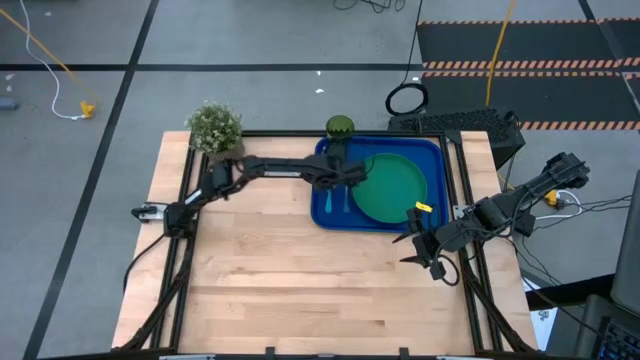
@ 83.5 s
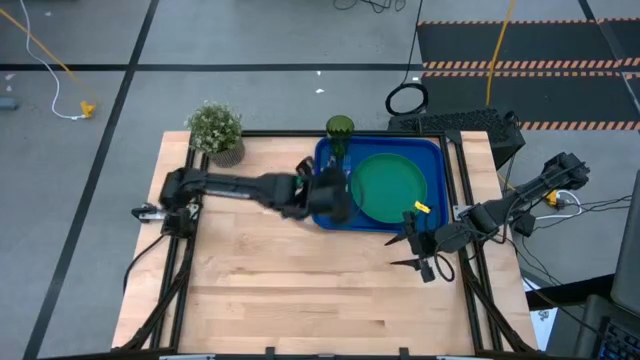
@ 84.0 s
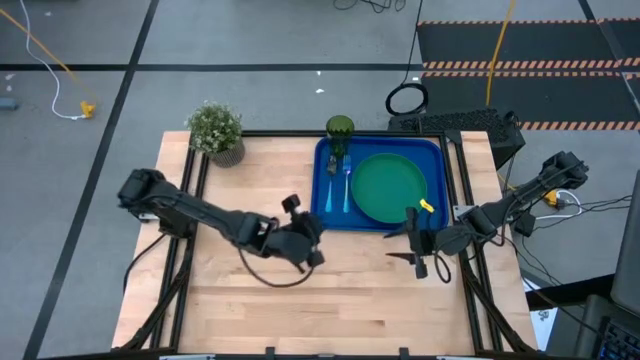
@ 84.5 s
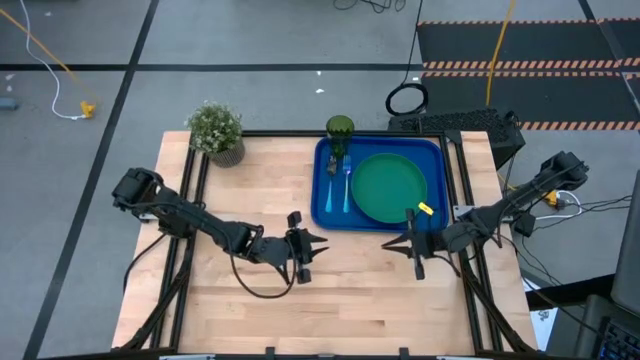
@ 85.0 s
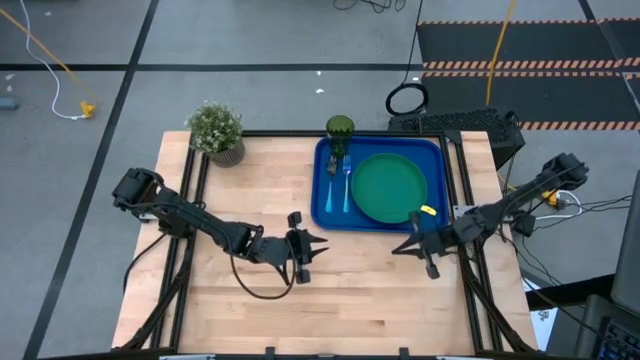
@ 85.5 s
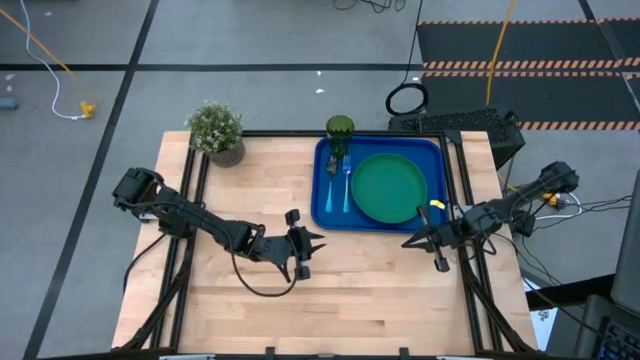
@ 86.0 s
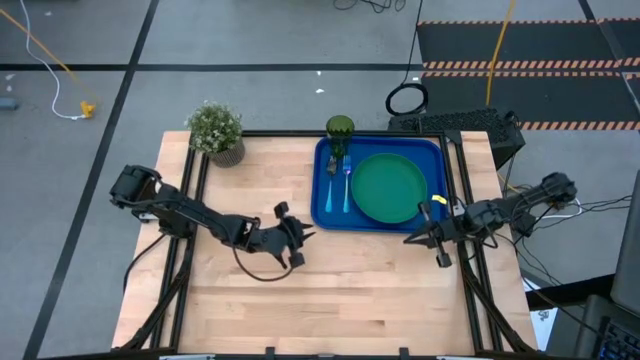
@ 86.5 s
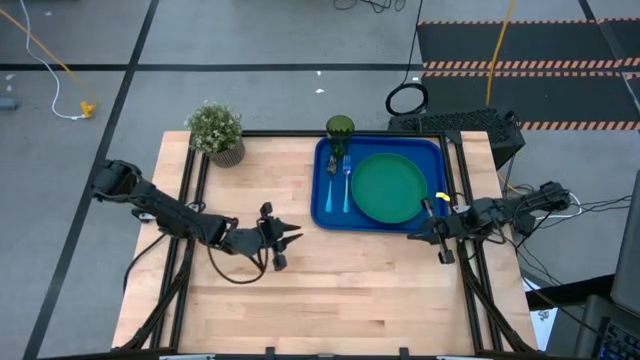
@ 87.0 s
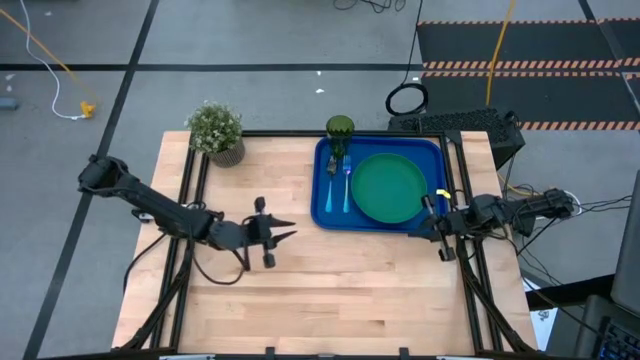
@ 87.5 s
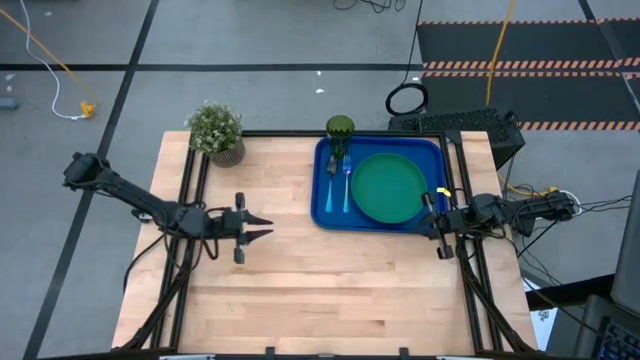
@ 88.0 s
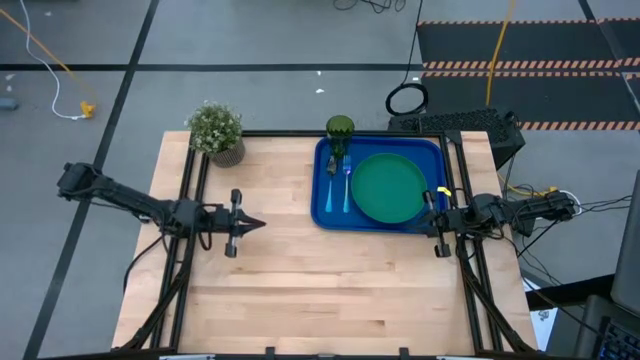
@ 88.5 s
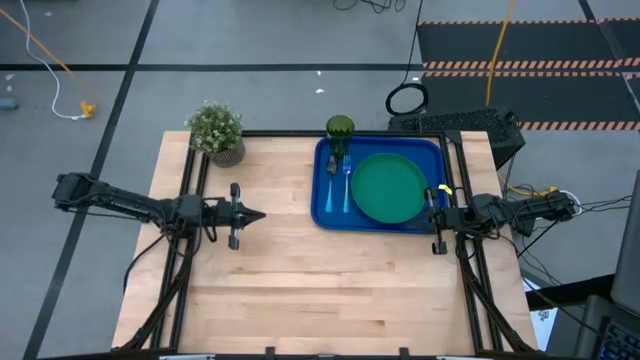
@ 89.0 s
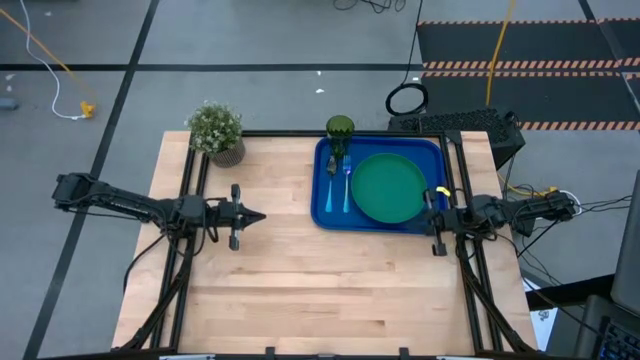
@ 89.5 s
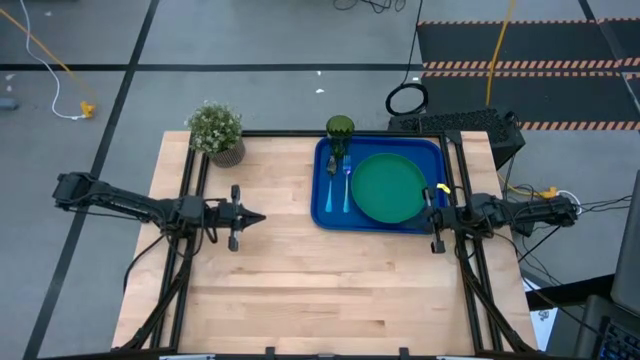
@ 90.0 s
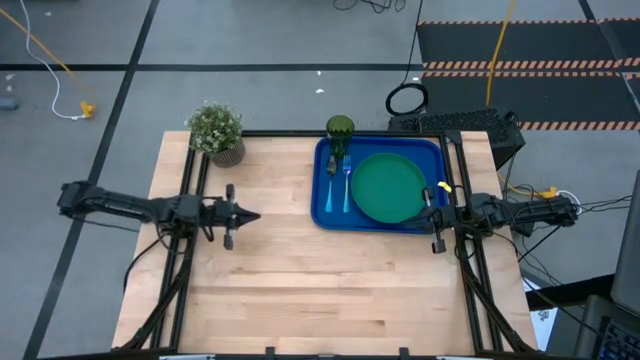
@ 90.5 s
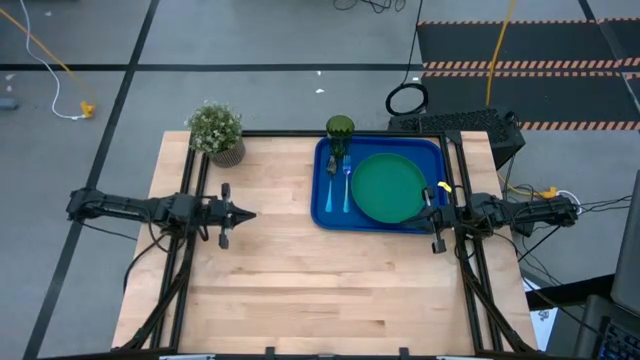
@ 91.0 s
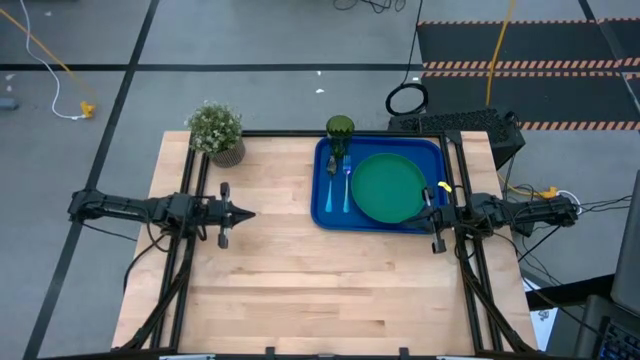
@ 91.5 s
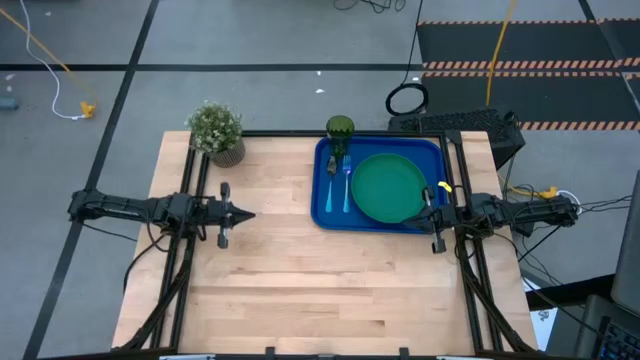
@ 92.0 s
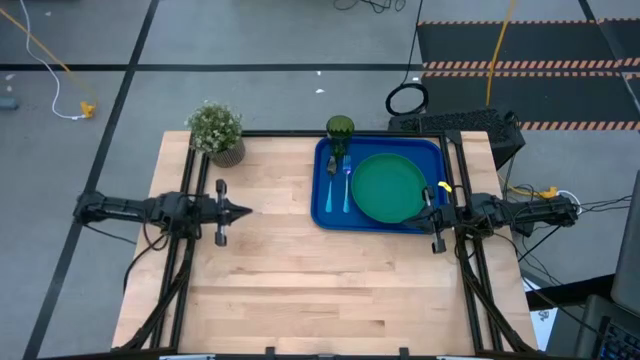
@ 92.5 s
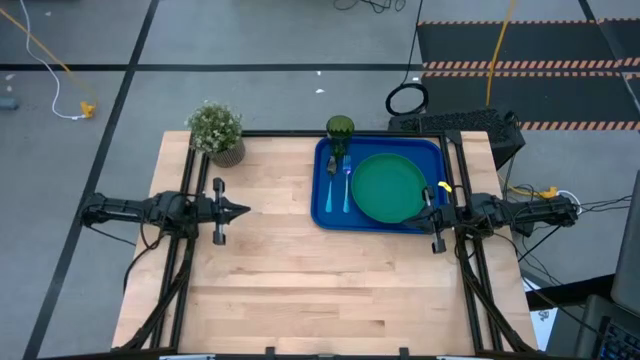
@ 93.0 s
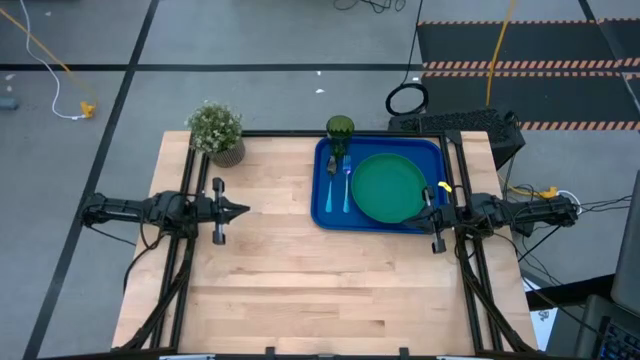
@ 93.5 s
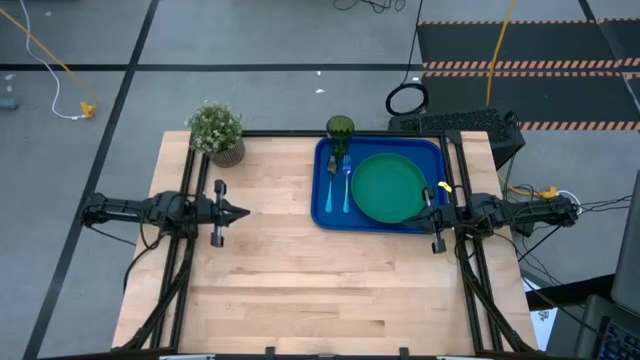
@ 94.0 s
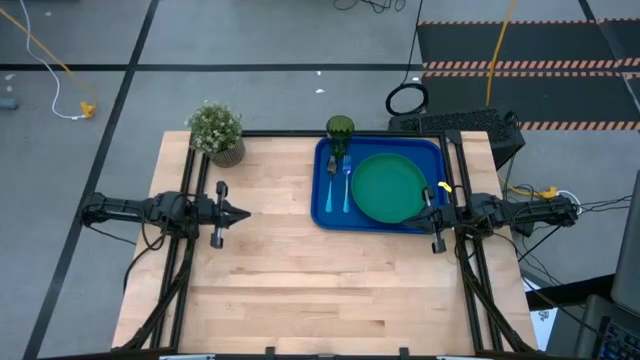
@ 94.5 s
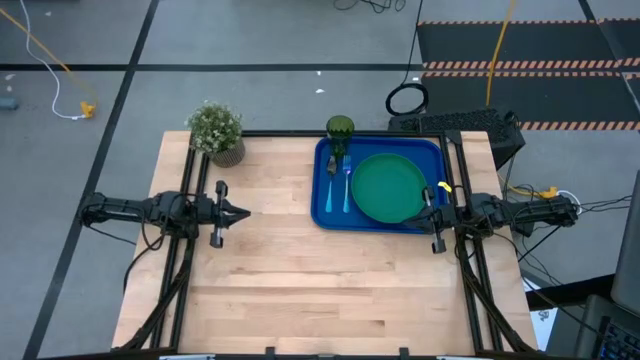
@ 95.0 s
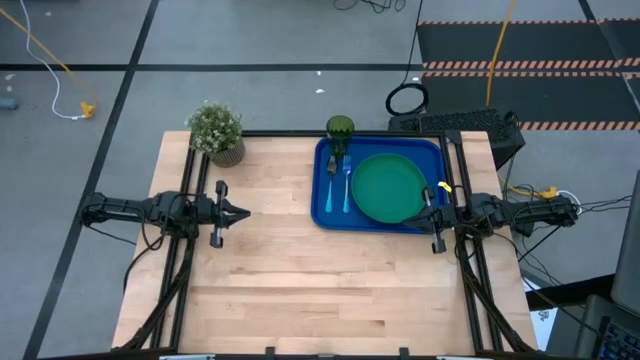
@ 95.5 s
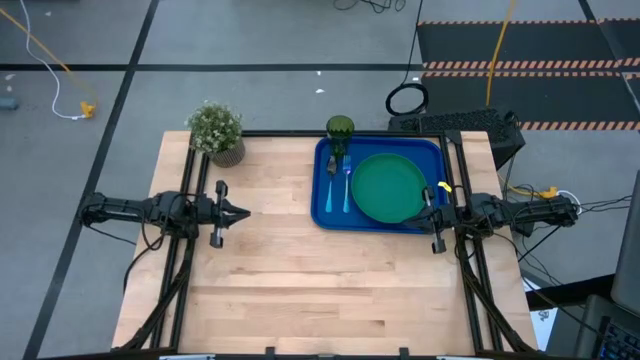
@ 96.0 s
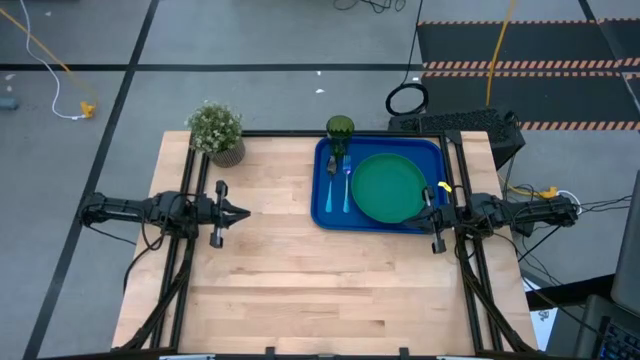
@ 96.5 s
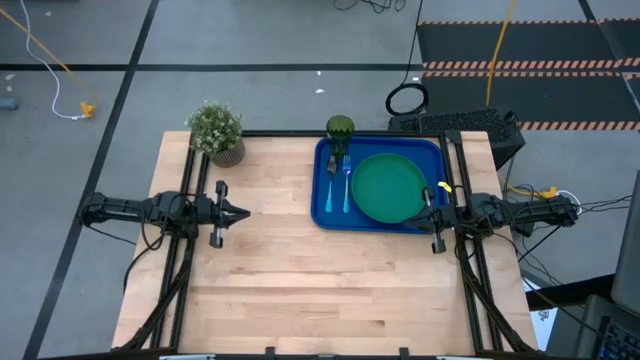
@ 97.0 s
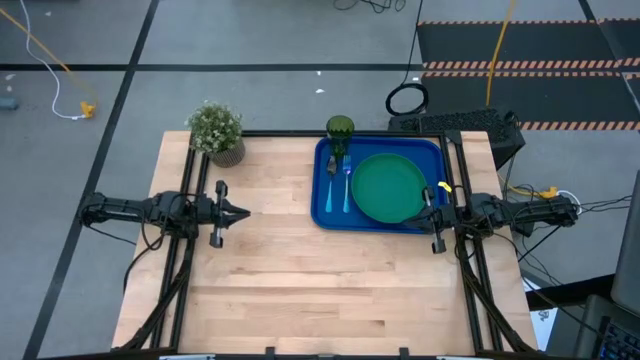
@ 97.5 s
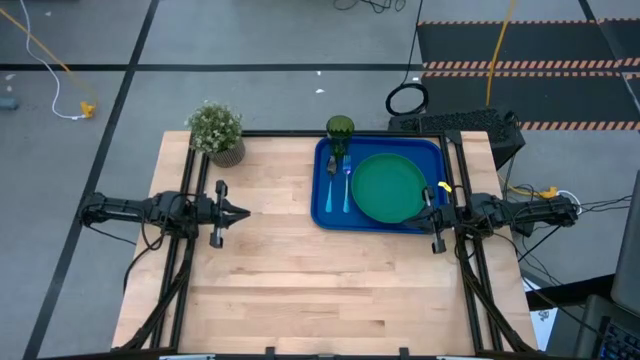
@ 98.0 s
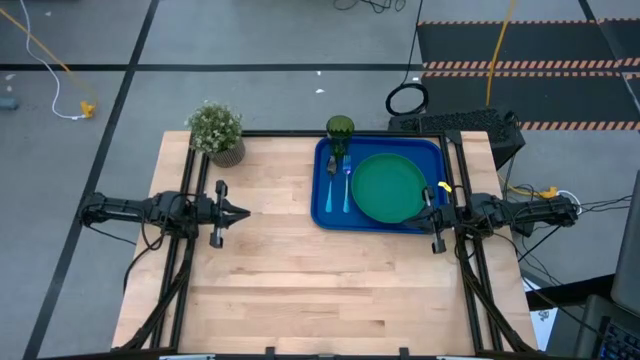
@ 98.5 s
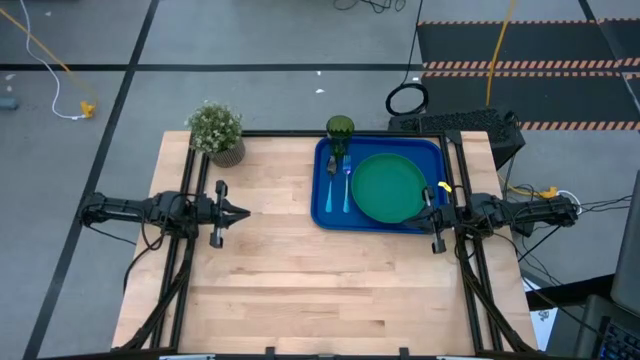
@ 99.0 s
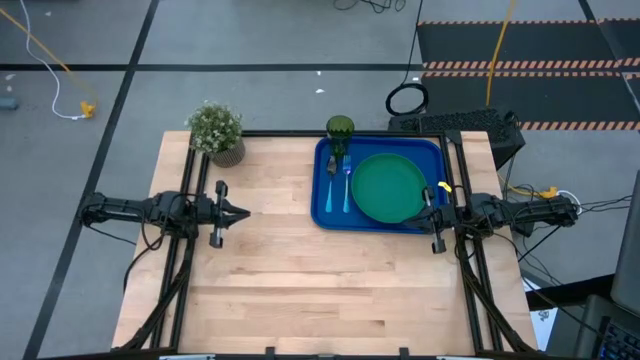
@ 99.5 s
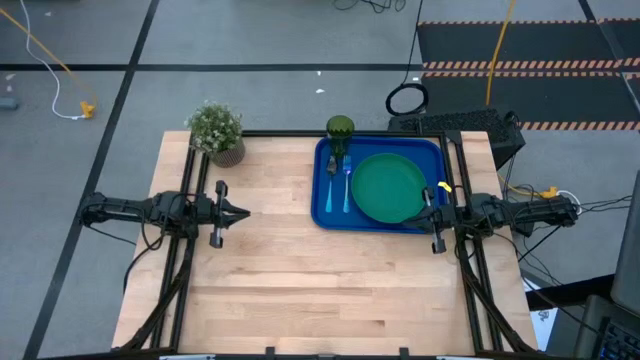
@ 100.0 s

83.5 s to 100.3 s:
Task: Pick and place plate/cup/fork/spoon on tray
Return to Home Position

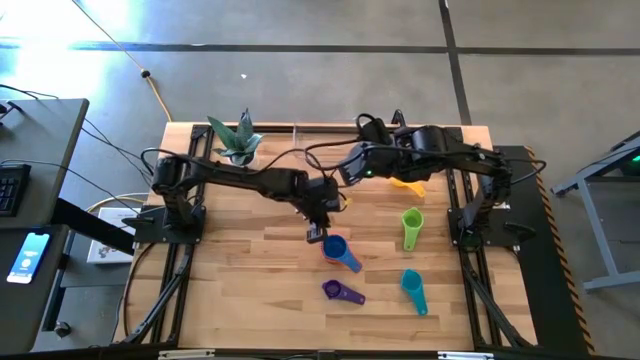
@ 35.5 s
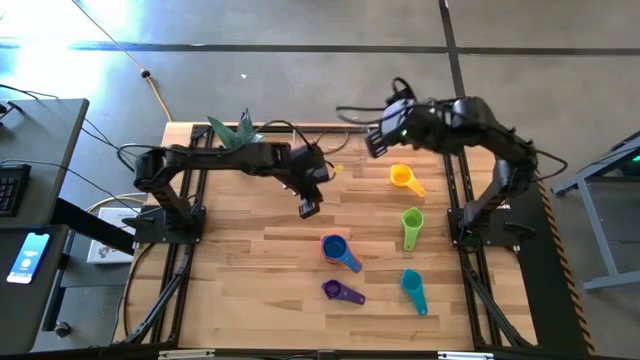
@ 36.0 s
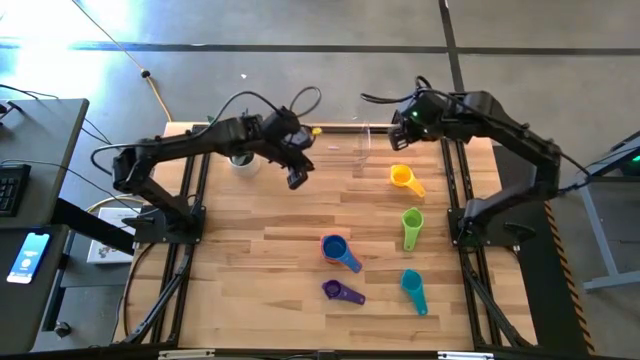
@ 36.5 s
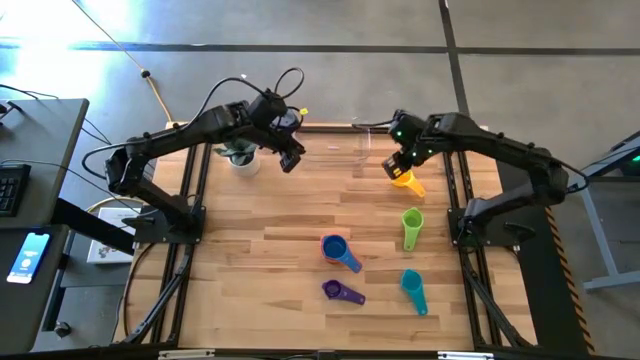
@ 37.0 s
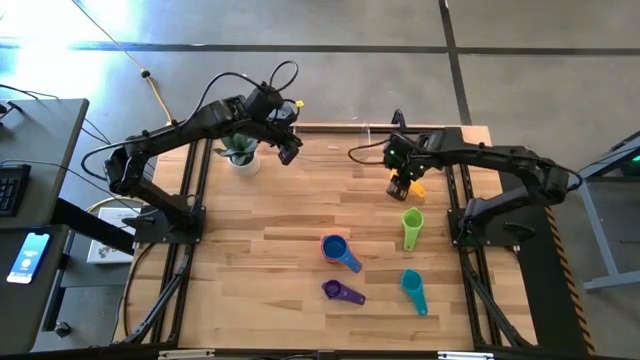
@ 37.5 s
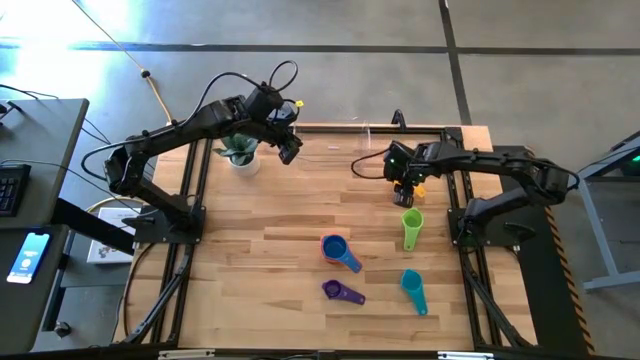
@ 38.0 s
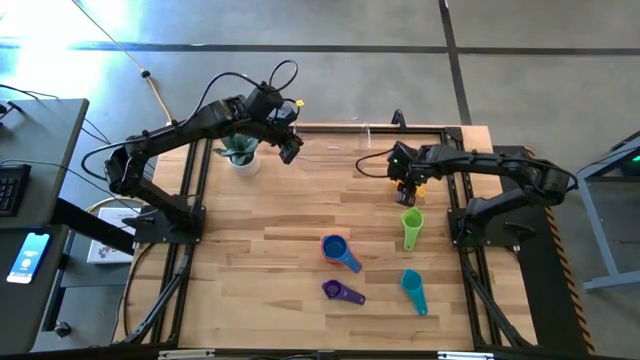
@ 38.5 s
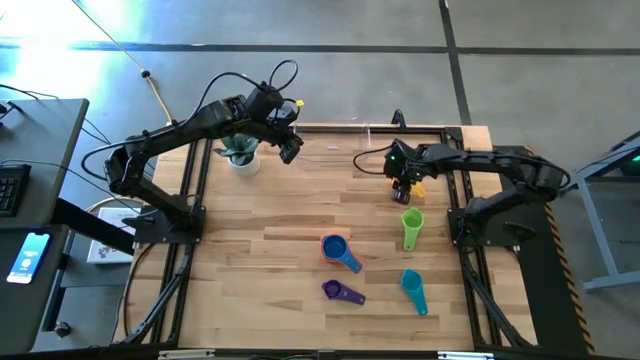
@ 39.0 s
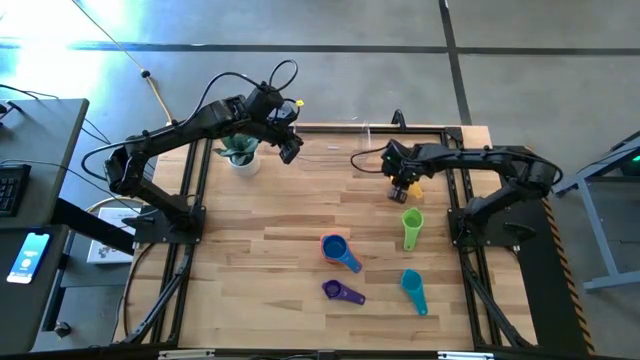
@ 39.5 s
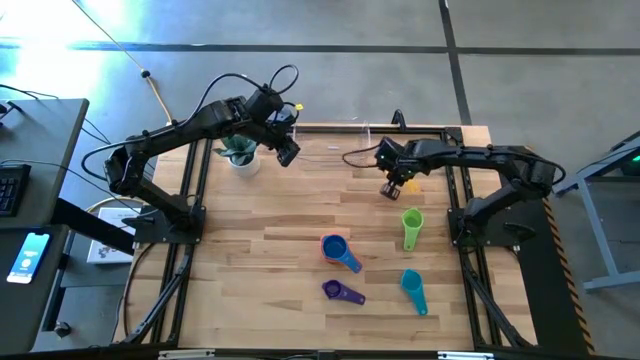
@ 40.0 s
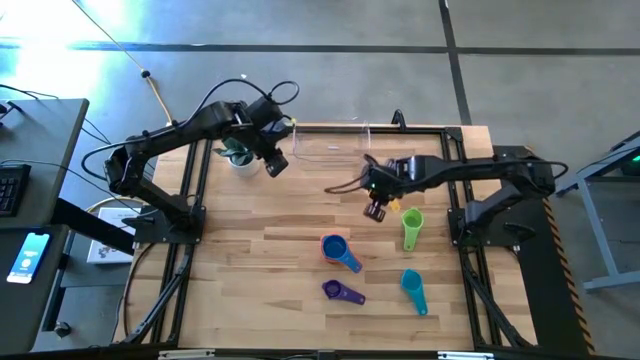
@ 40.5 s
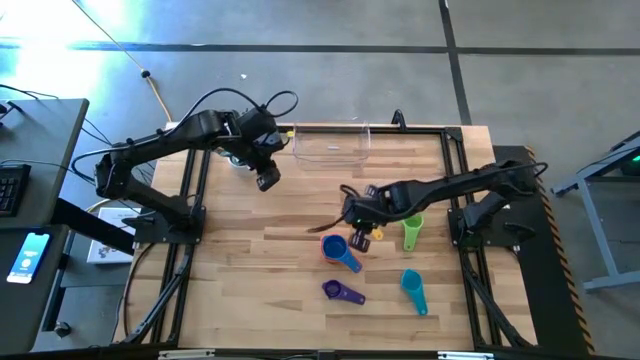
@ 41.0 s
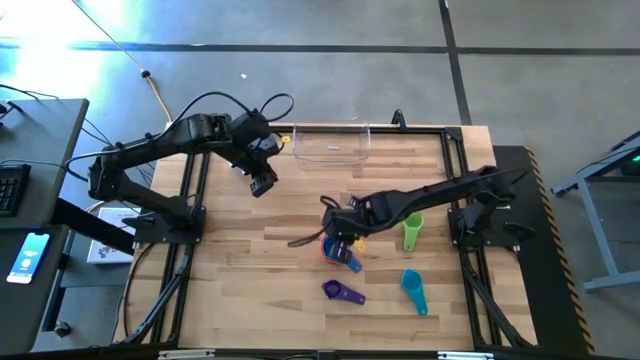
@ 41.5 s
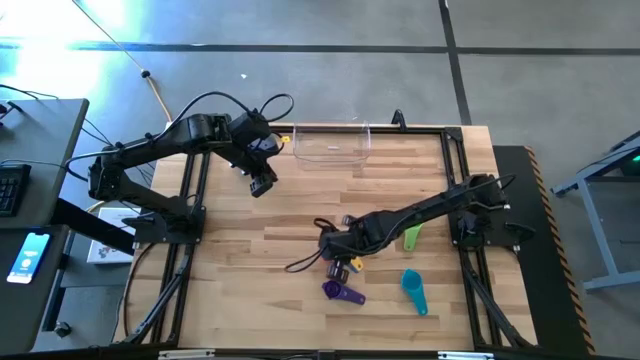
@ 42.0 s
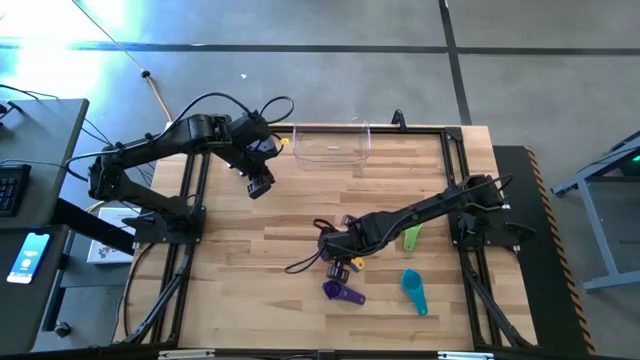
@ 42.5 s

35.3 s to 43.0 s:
Task: Nest measuring cups in basket
Stack the yellow measuring cup on top of the blue measuring cup
